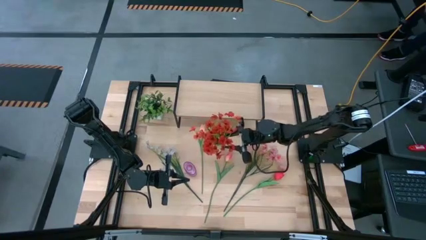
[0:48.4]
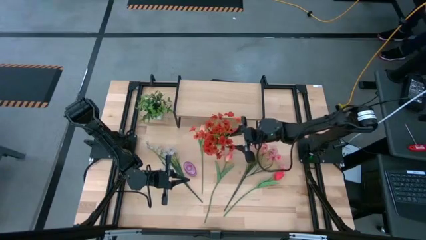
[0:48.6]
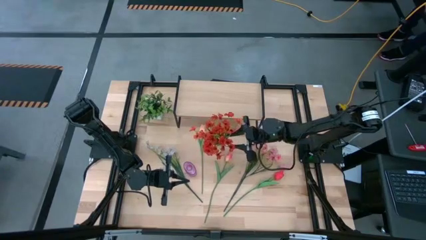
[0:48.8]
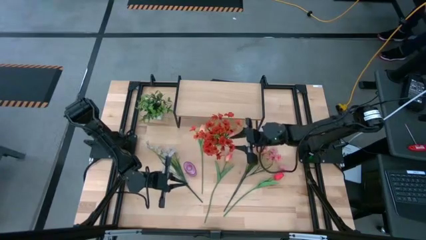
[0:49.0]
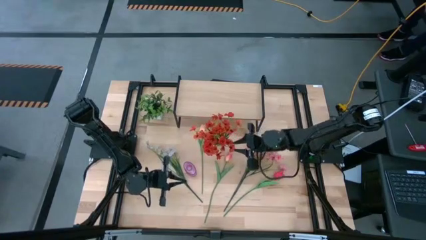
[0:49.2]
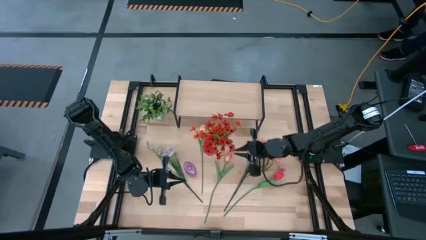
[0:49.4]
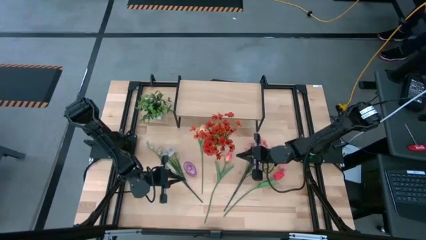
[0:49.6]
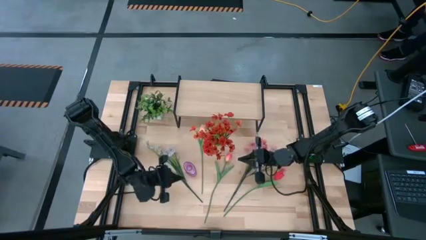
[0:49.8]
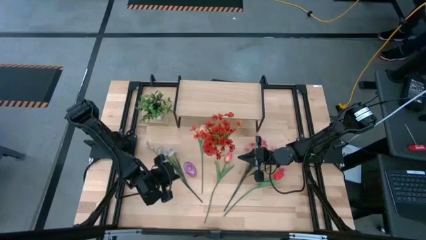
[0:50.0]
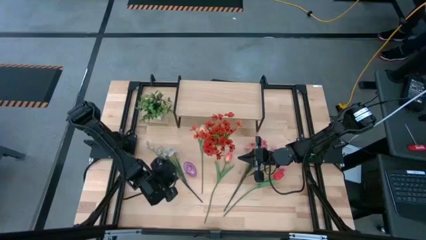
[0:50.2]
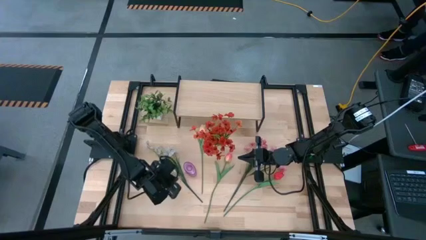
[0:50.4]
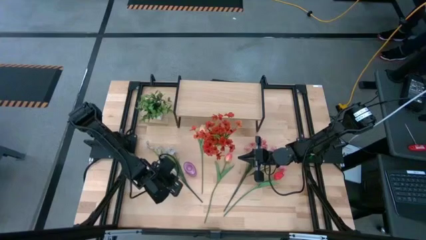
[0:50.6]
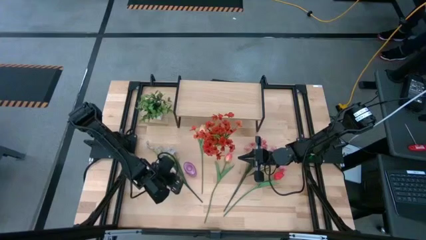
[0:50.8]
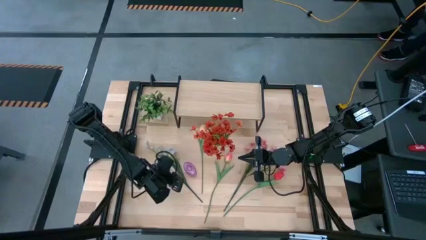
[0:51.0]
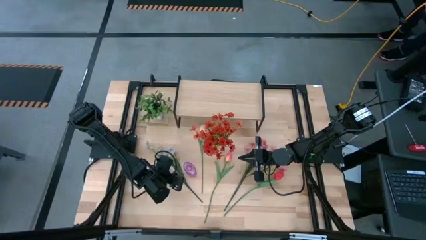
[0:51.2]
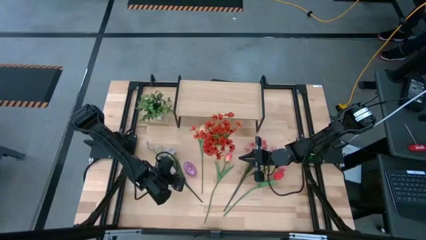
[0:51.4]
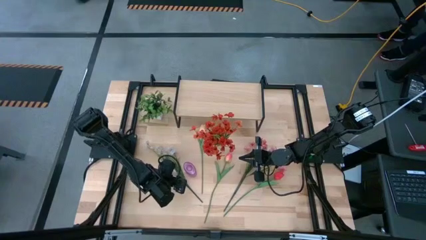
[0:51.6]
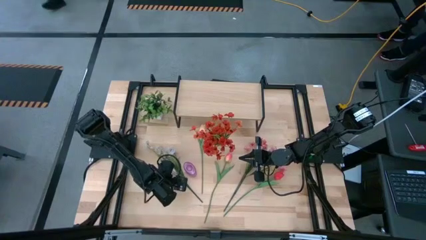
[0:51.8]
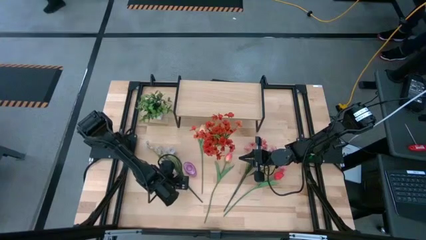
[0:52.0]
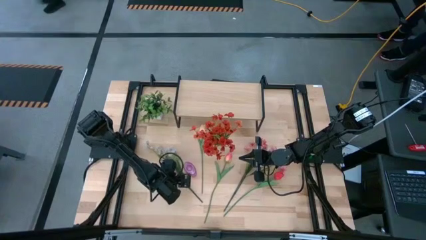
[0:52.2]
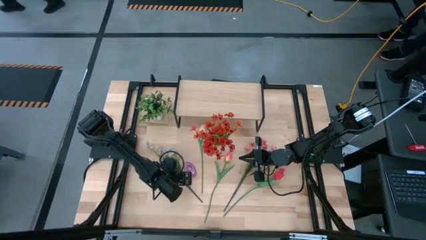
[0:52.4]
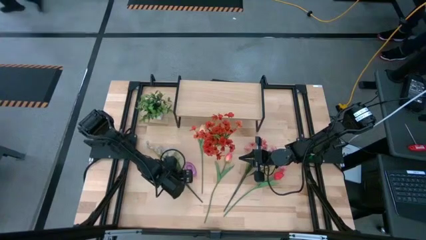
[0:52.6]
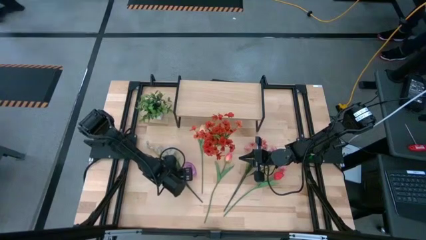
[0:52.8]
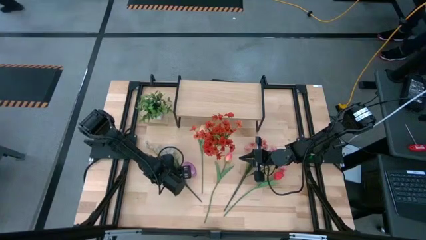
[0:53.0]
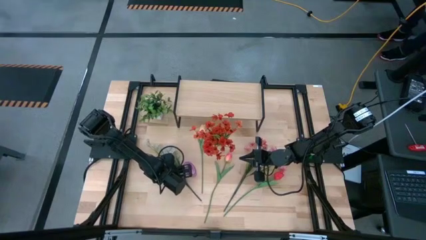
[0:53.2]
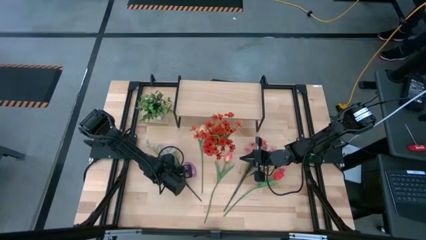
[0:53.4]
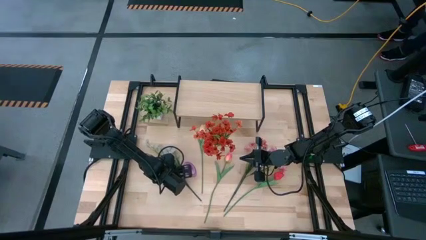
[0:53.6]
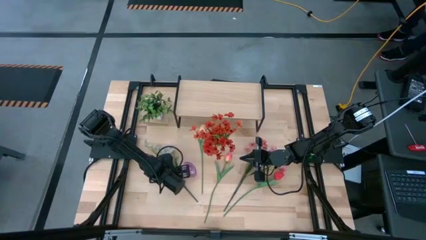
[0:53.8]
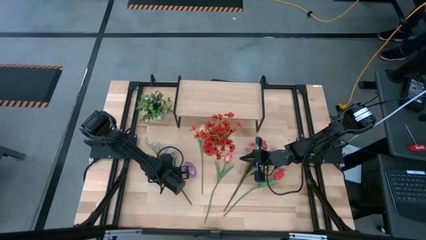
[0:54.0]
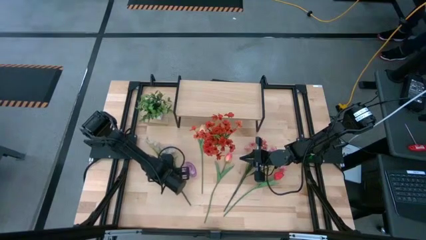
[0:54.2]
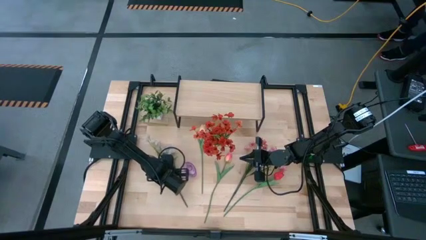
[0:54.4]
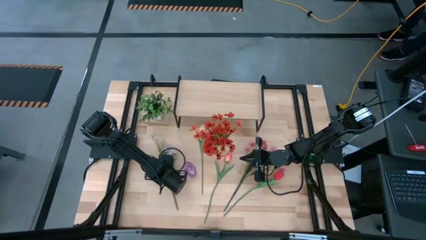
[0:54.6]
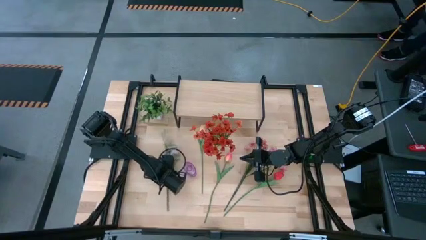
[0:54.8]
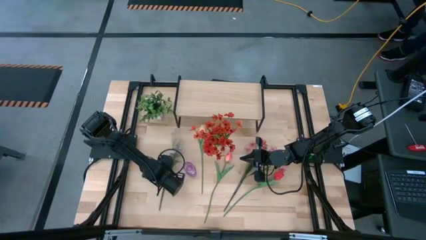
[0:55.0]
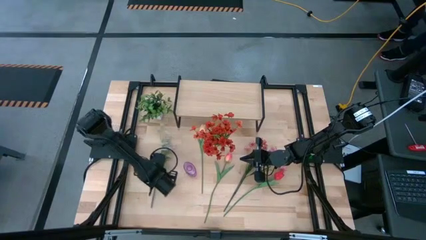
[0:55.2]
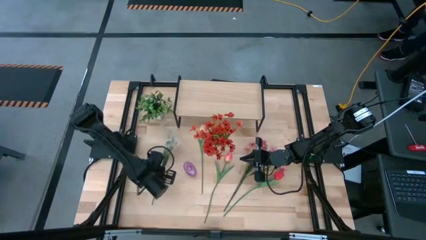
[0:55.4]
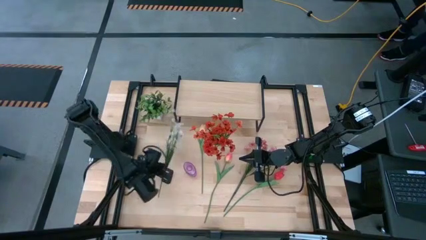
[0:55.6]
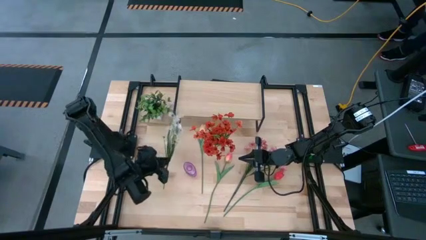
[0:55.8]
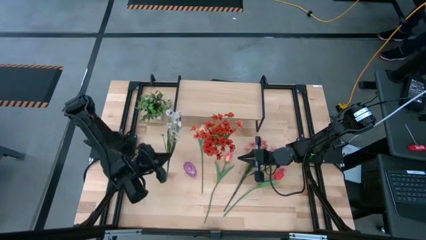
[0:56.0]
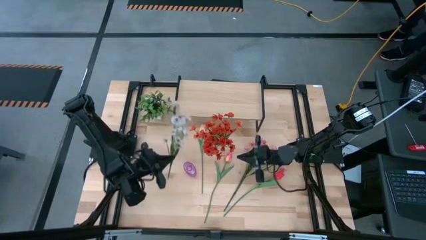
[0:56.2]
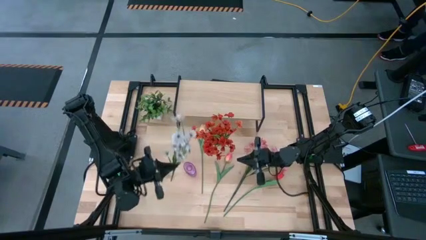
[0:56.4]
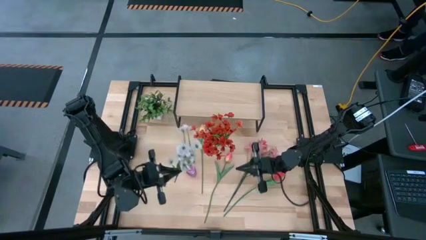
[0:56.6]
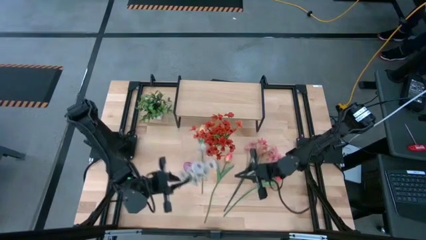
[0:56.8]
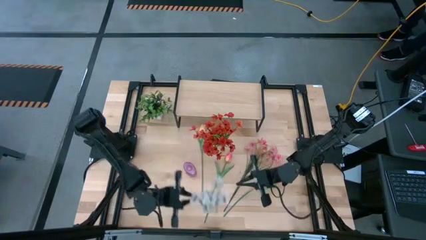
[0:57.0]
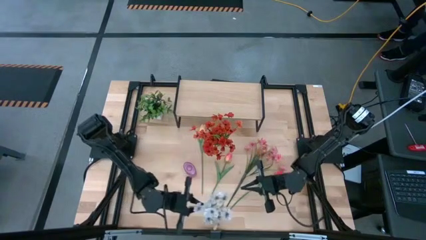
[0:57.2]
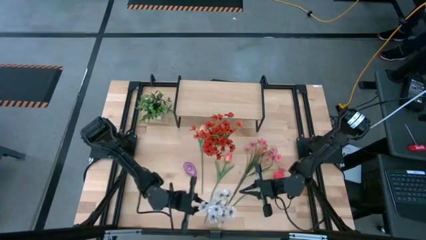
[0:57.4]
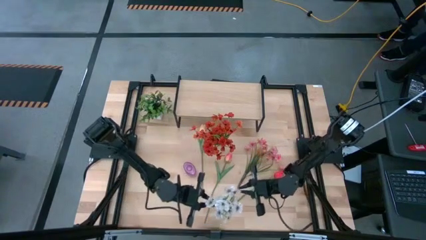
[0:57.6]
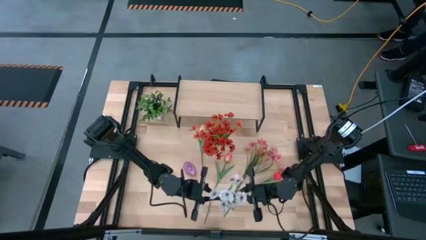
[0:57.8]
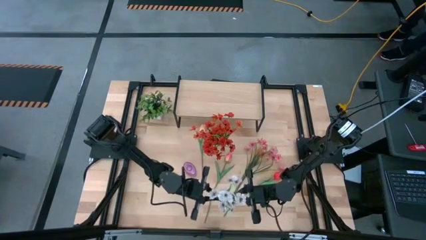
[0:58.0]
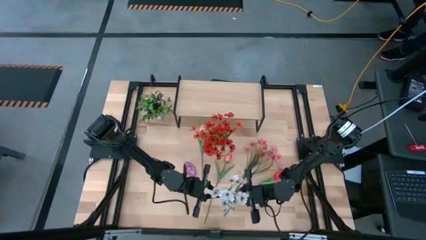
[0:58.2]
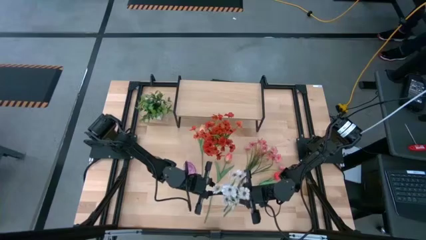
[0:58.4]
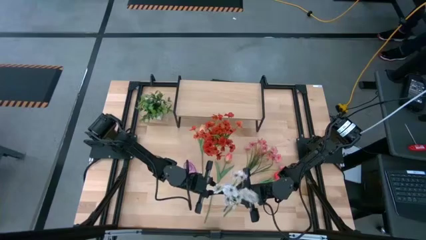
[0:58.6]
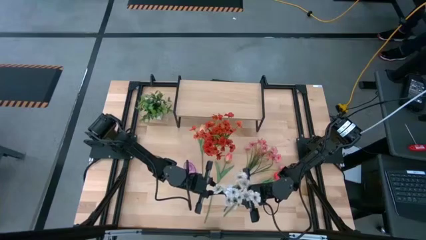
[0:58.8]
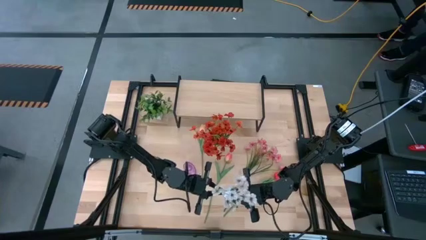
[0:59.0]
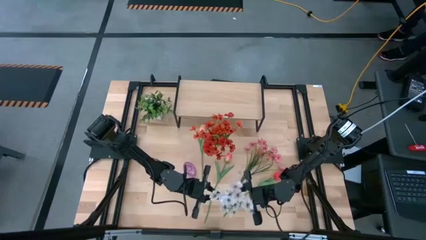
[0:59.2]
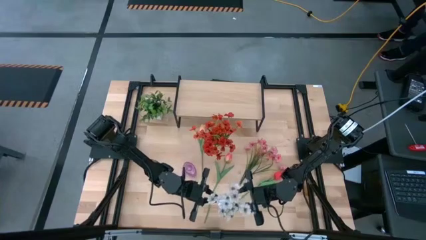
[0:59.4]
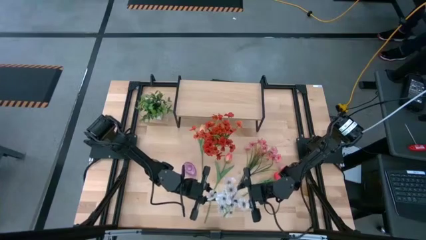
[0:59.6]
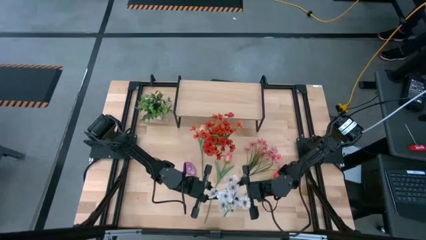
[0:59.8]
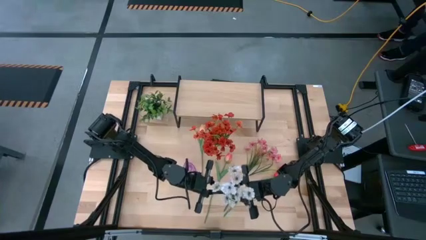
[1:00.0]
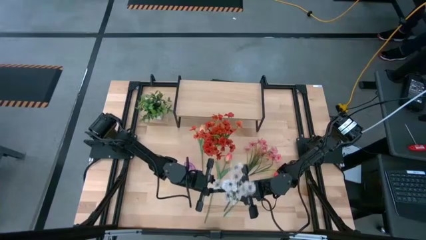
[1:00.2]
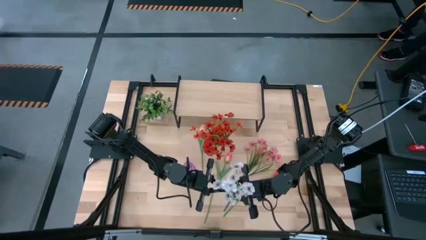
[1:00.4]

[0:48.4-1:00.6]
Task: Pick and place flowers into a vace then onto a shelf
Put the white flowers into the transparent vase

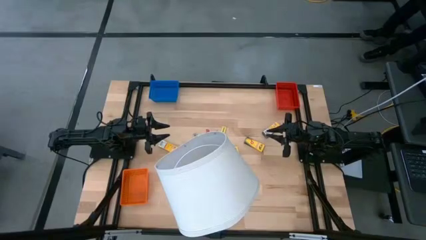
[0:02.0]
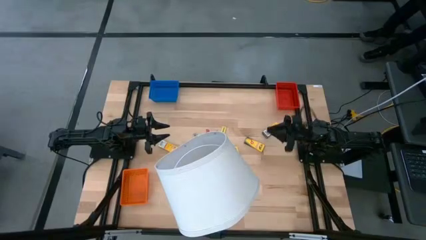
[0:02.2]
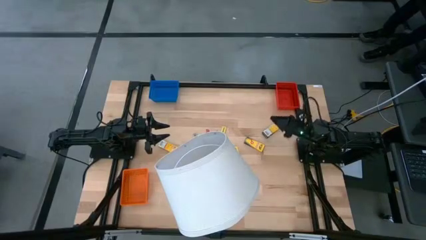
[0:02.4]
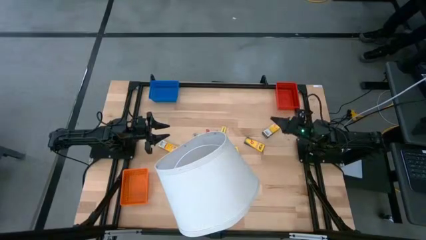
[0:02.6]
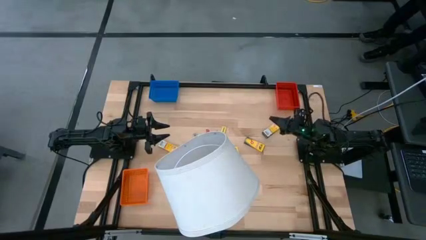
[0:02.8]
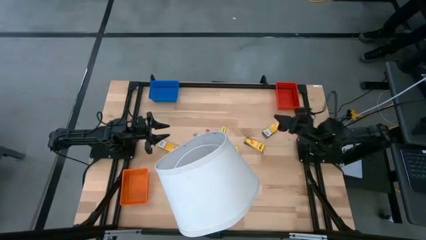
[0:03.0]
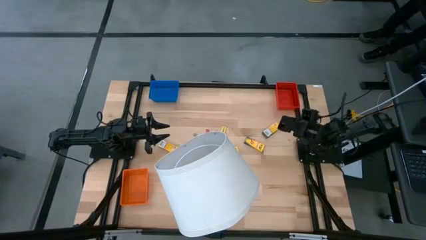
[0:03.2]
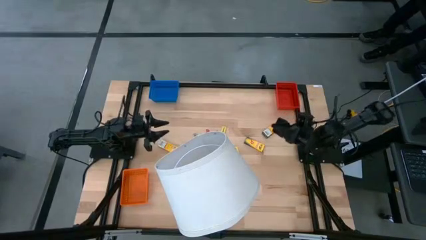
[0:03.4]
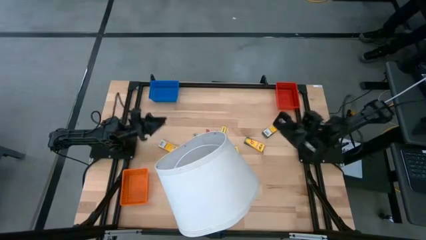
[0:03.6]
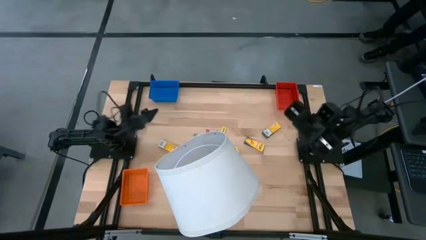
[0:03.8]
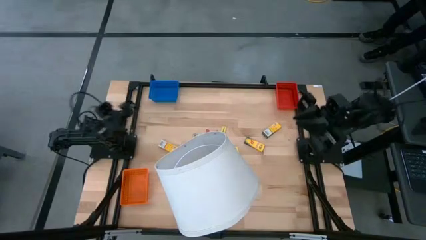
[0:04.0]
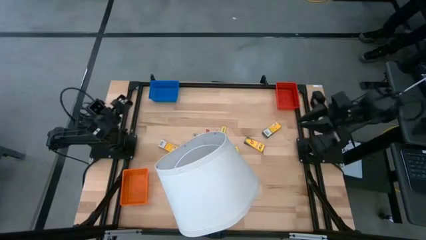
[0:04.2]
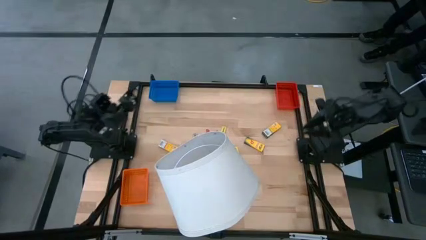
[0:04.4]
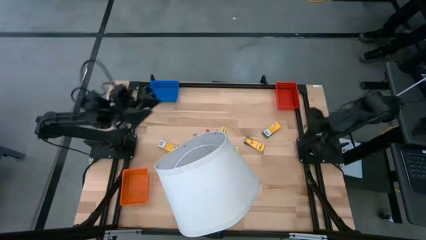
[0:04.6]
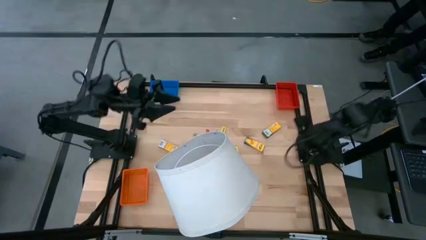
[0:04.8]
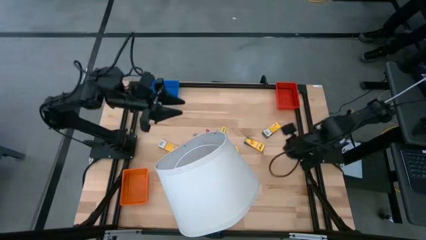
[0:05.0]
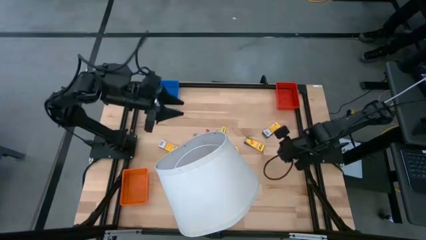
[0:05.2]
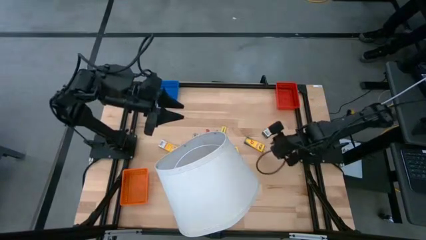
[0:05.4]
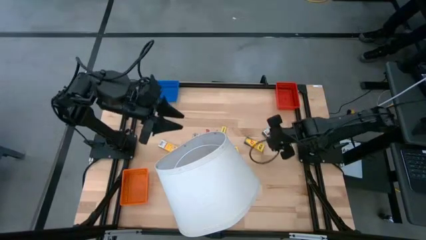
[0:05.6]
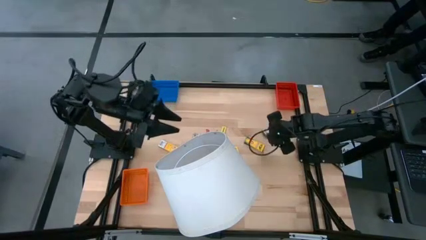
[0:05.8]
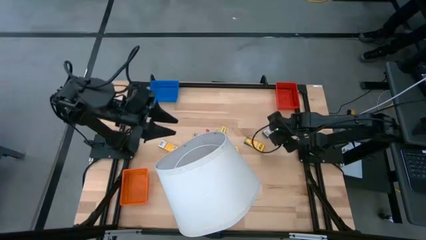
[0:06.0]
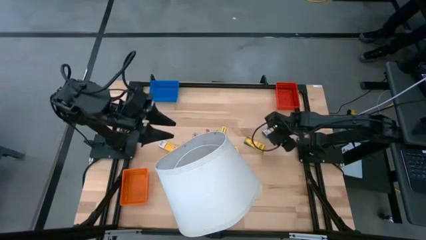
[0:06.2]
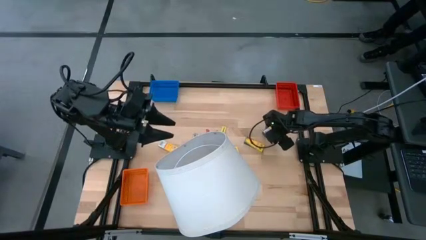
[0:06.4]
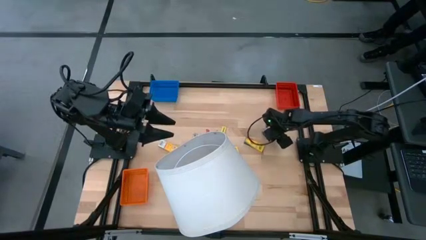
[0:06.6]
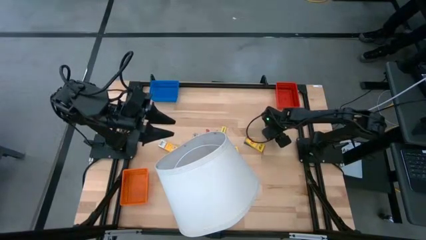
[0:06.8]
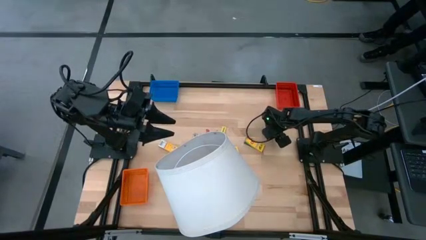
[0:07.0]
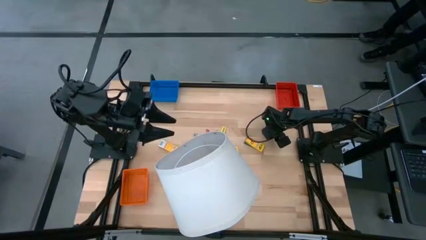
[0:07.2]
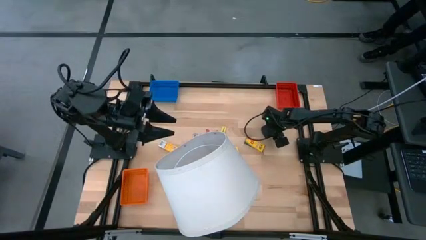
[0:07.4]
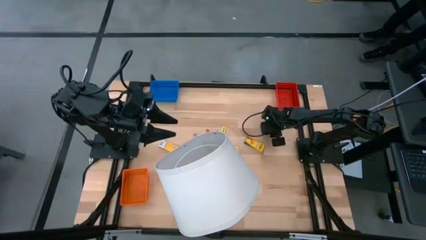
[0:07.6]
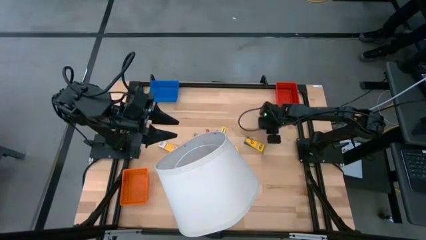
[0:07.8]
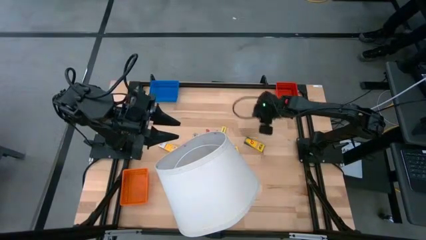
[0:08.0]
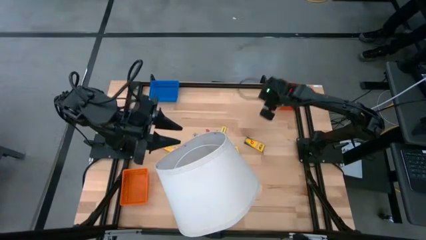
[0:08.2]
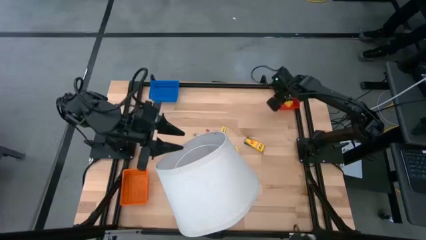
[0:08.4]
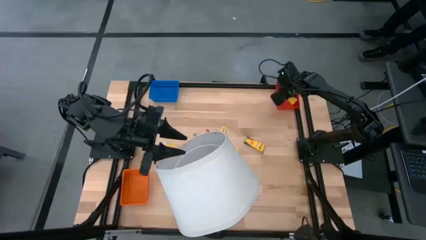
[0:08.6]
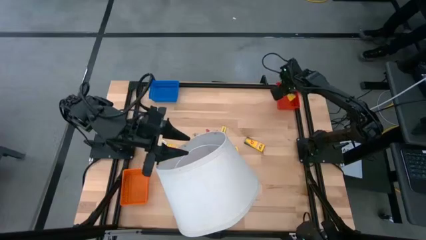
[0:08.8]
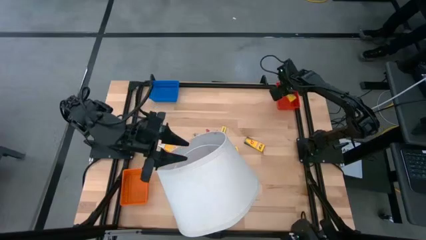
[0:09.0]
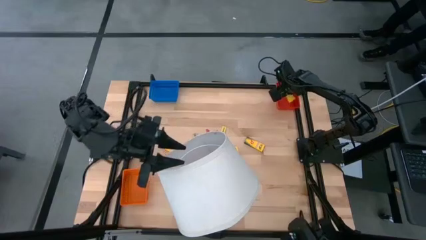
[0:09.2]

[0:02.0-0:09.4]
Task: Pick & Place School Supplies
Put the yellow crayon box into the red basket
